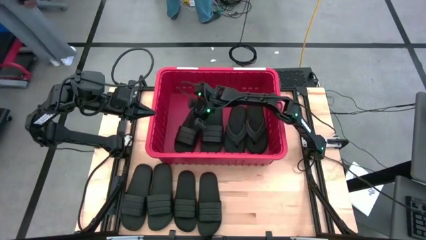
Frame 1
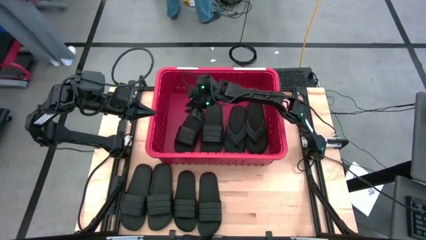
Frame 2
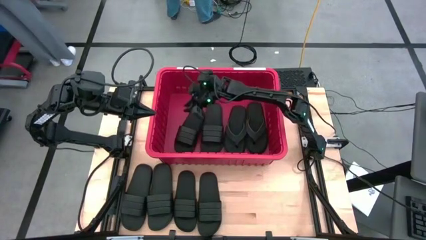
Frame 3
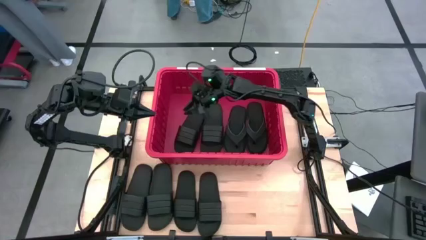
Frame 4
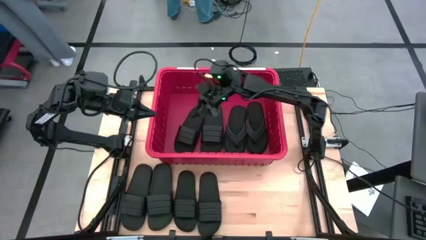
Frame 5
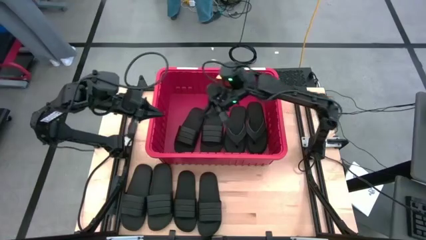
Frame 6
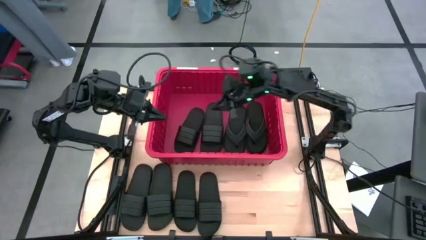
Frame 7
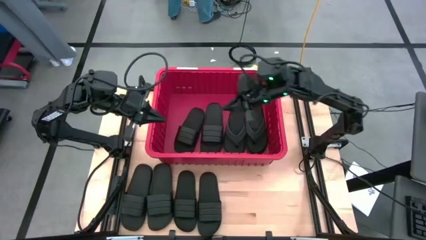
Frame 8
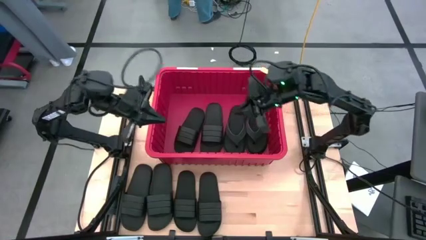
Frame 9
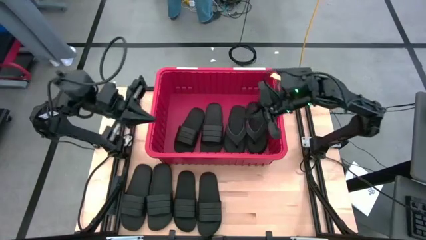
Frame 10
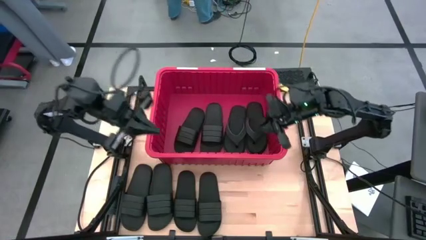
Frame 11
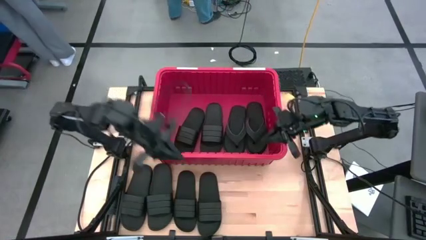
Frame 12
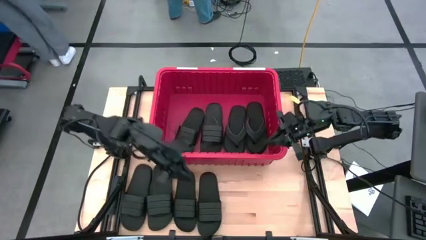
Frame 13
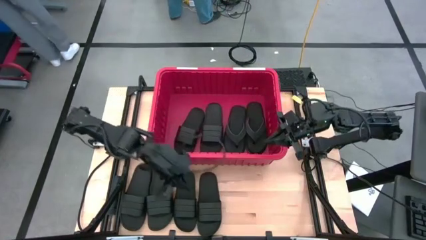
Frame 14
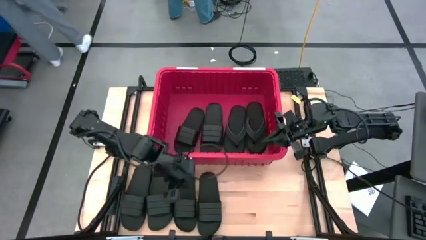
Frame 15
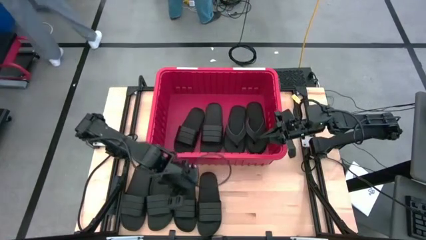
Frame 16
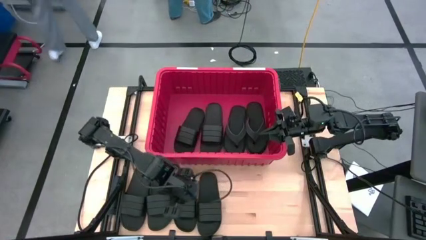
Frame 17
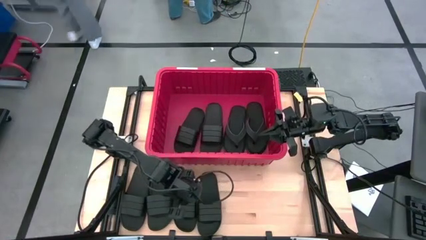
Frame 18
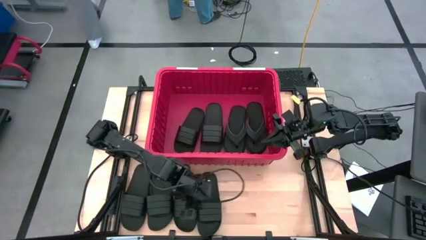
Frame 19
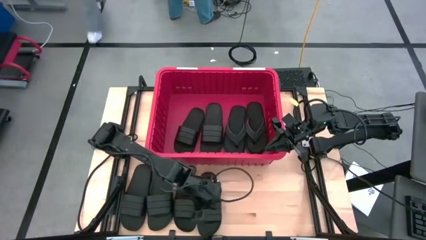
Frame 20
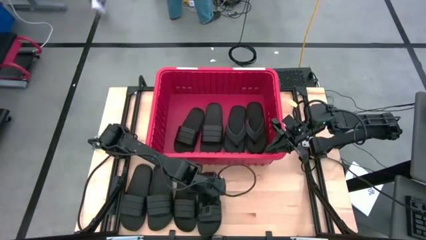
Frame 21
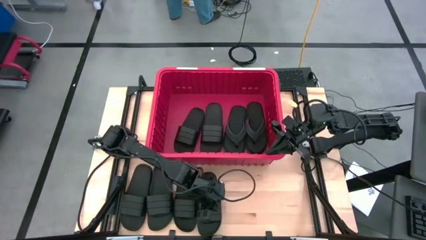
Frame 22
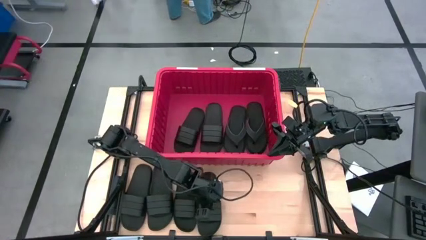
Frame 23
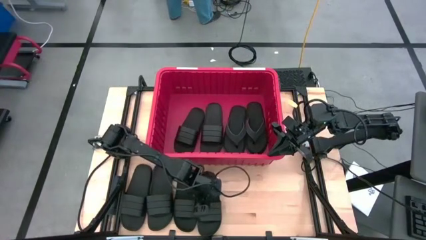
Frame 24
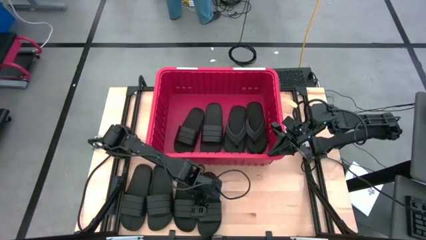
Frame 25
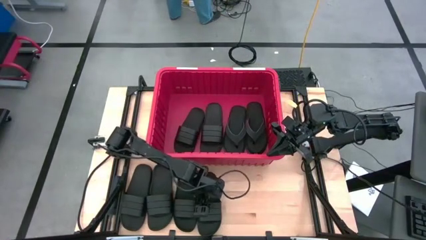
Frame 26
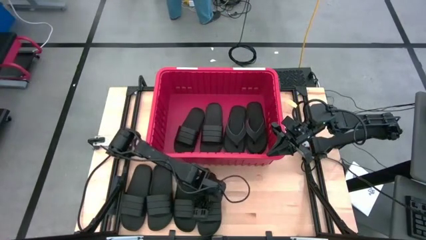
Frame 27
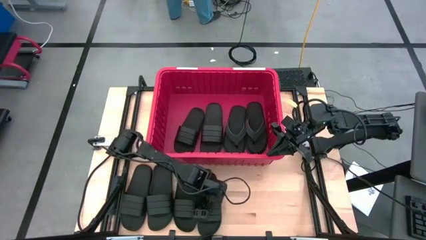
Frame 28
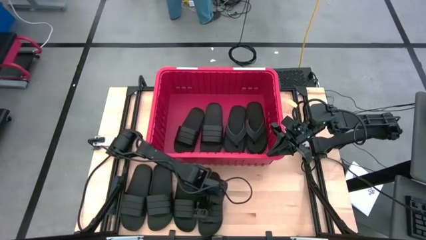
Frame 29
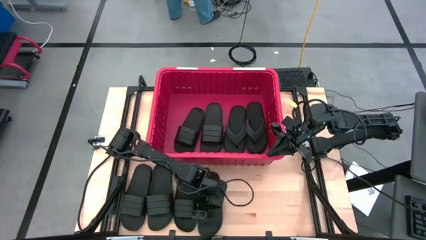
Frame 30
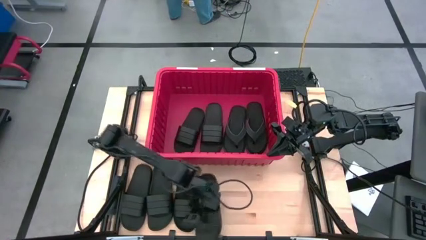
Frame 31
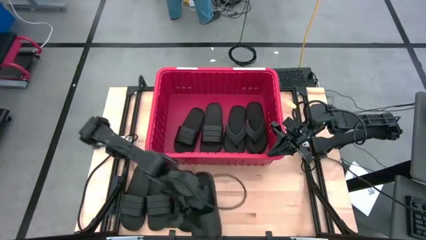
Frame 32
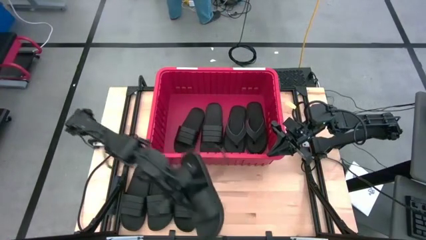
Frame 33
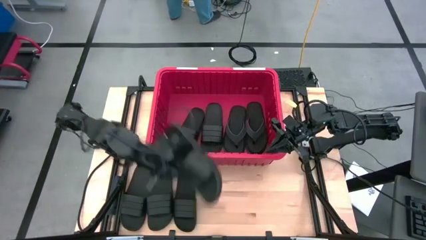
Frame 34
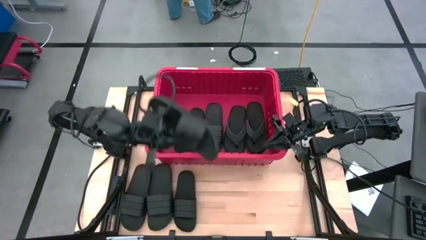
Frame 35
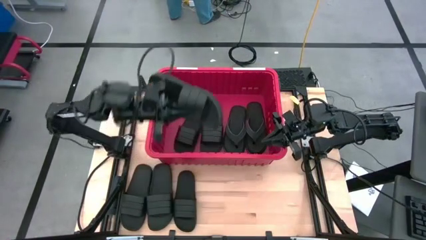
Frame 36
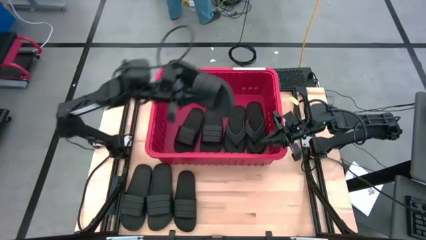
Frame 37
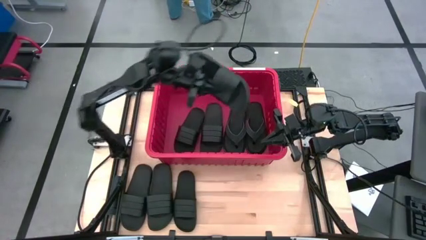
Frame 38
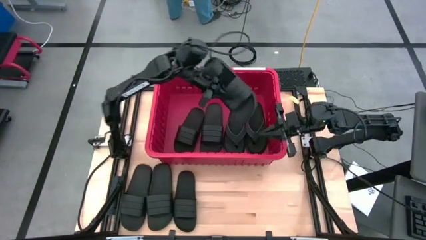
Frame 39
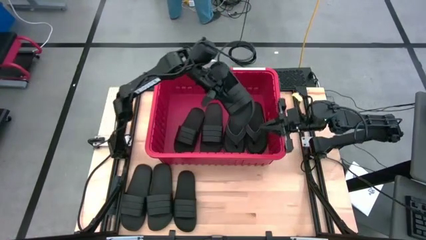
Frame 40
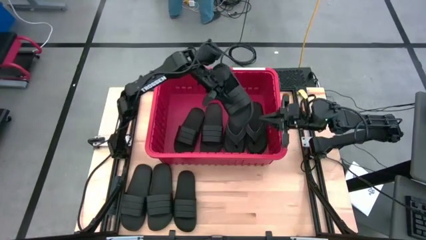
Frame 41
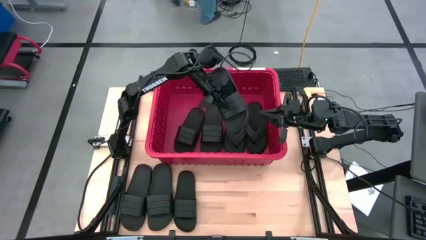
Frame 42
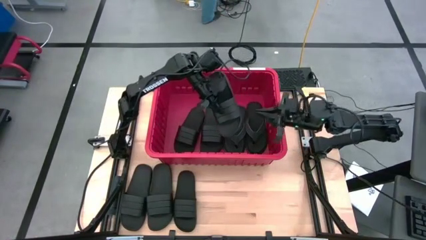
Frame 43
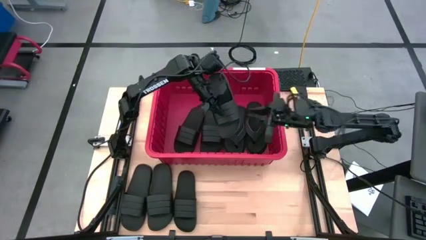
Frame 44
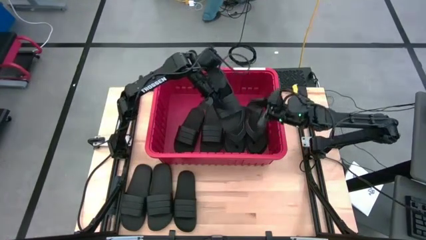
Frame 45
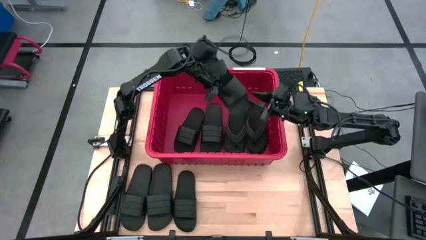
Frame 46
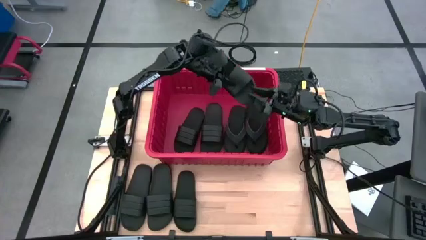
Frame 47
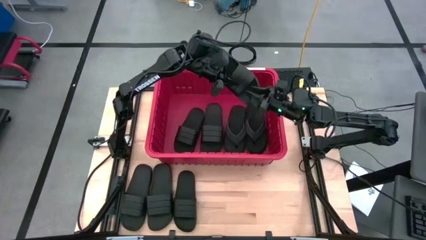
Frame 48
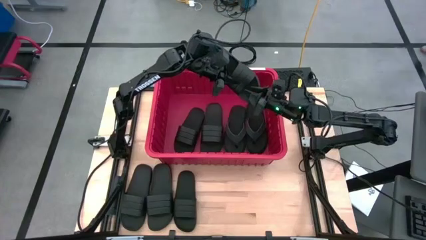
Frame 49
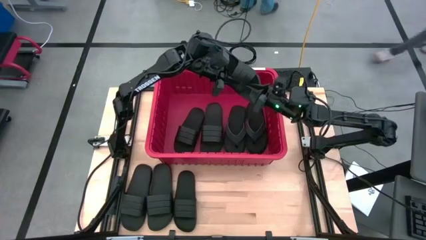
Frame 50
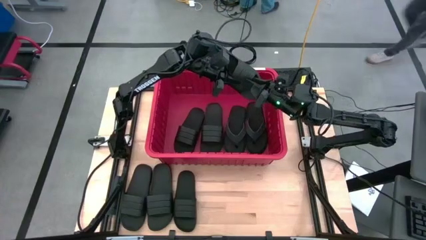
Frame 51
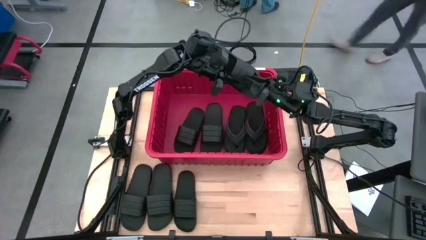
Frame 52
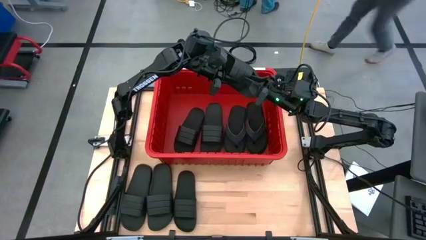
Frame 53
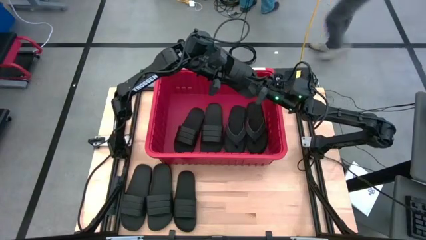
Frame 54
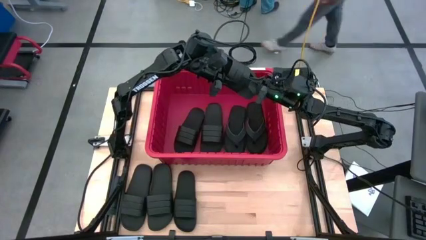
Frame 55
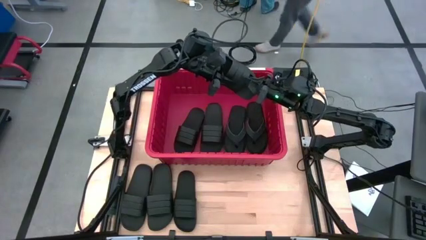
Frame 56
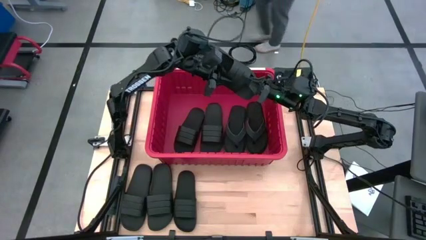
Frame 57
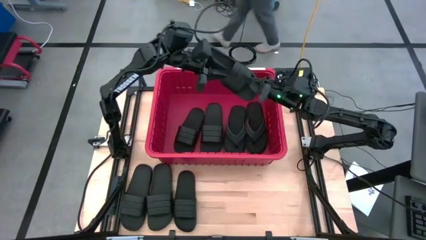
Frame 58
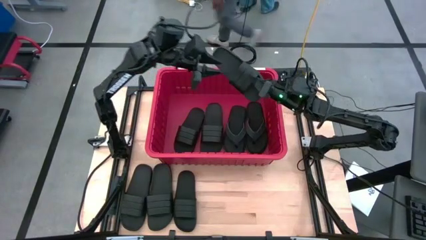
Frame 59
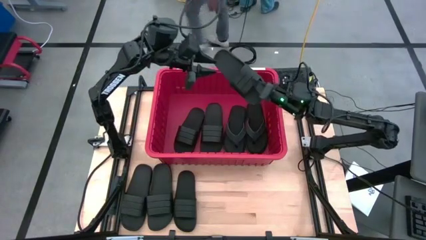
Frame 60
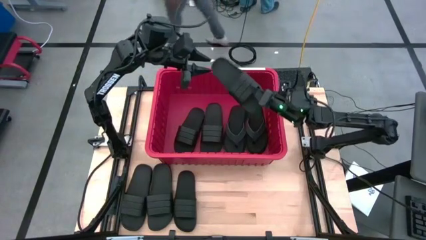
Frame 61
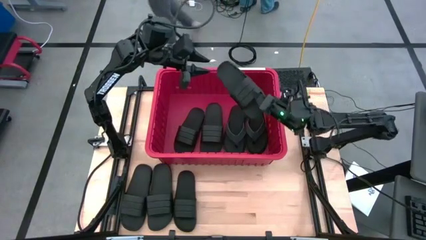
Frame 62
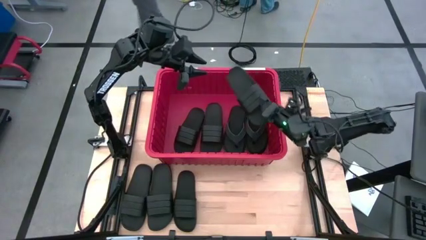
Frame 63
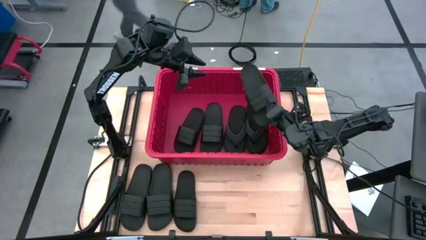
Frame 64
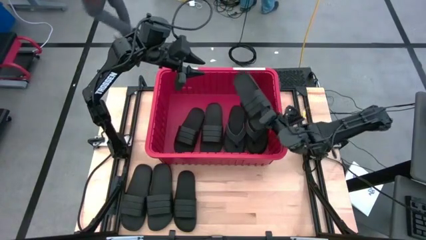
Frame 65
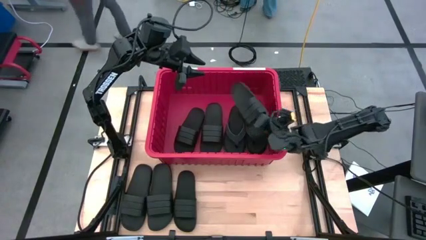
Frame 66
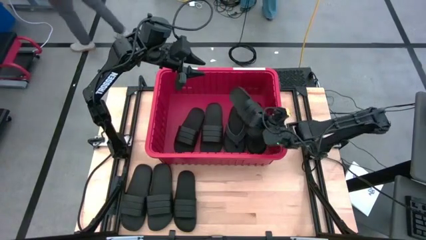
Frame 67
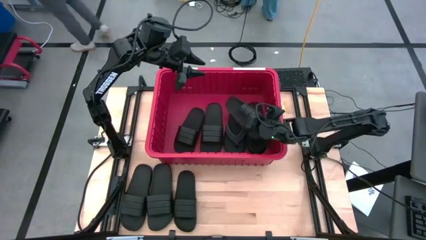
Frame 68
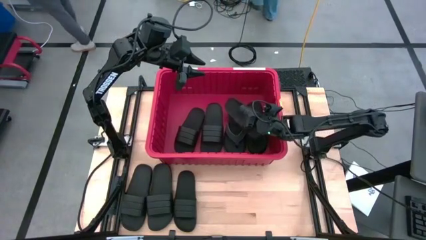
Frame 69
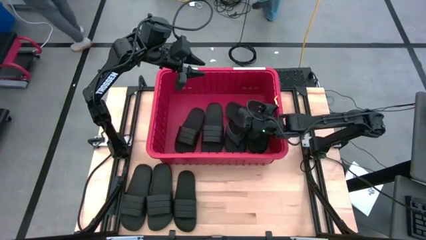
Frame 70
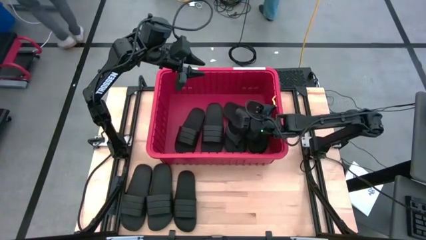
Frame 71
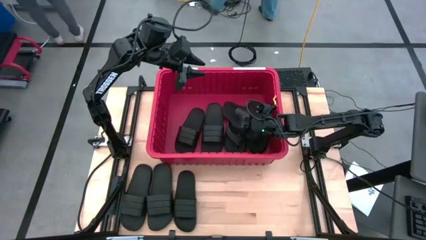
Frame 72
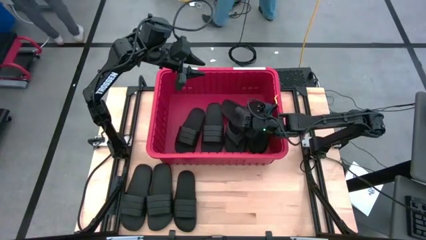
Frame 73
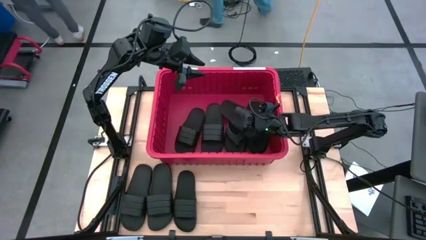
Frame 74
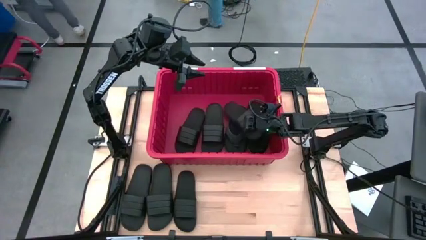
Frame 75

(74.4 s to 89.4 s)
Task: Pick and place slides into bin
Put the black slide into the red bin
